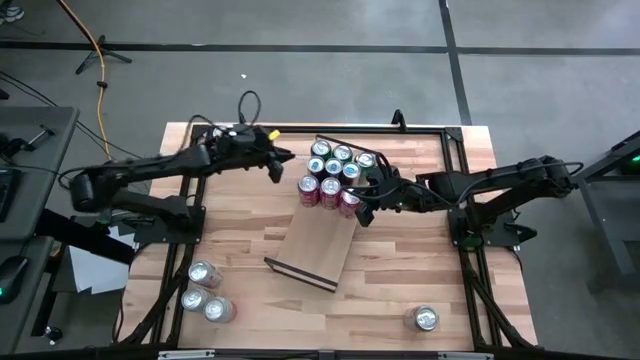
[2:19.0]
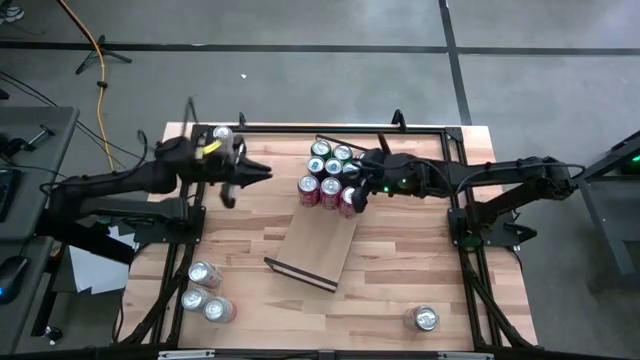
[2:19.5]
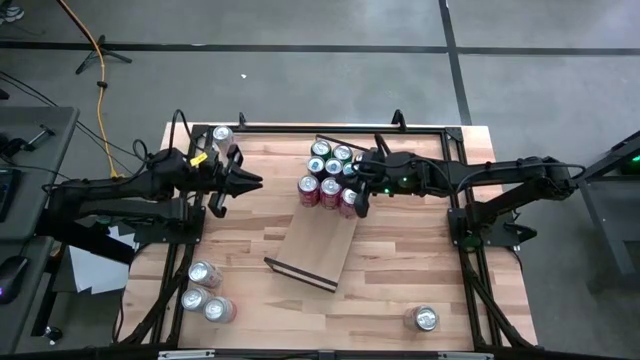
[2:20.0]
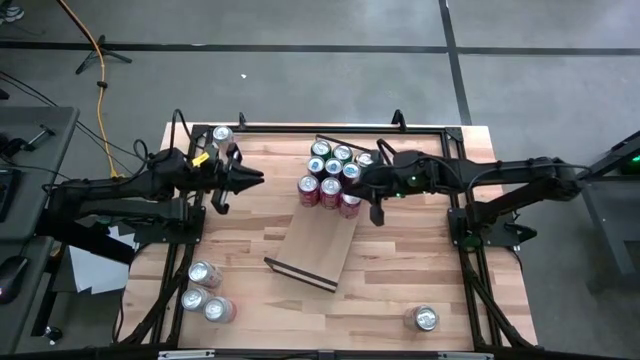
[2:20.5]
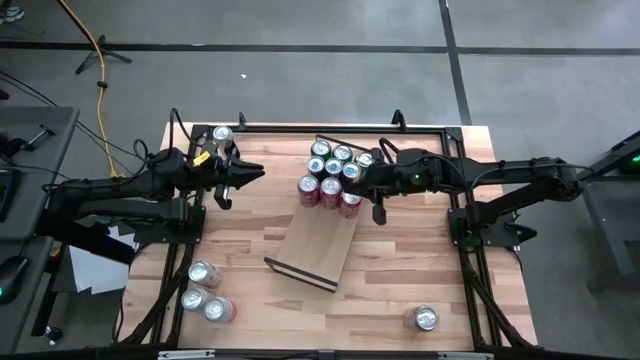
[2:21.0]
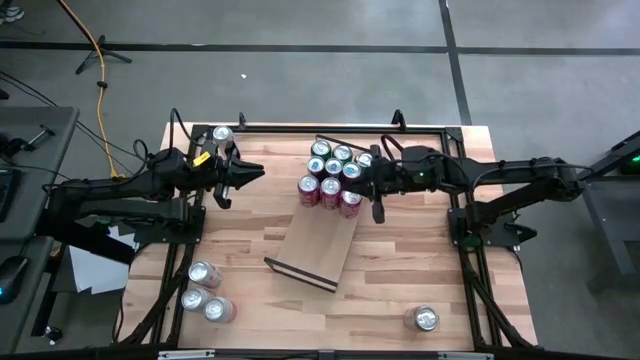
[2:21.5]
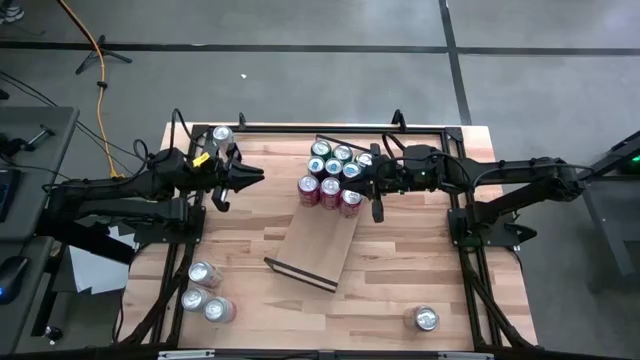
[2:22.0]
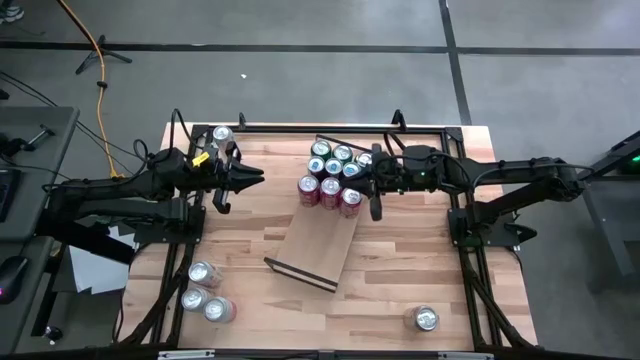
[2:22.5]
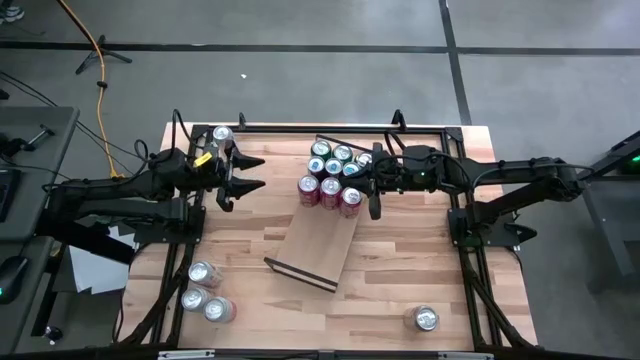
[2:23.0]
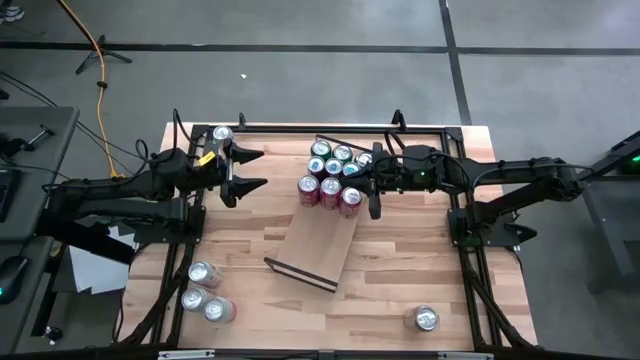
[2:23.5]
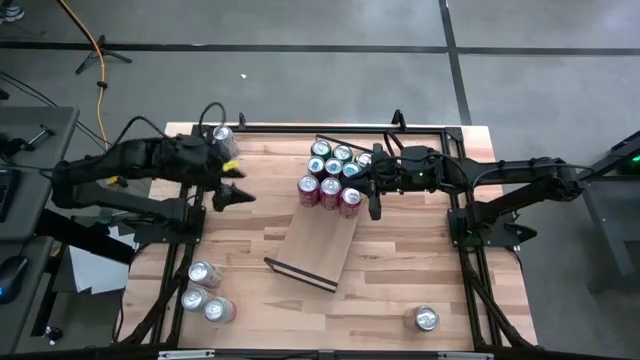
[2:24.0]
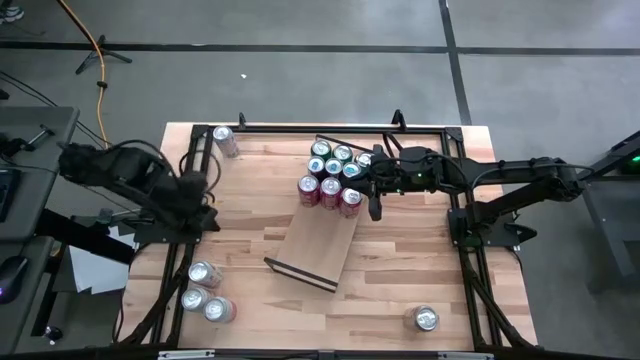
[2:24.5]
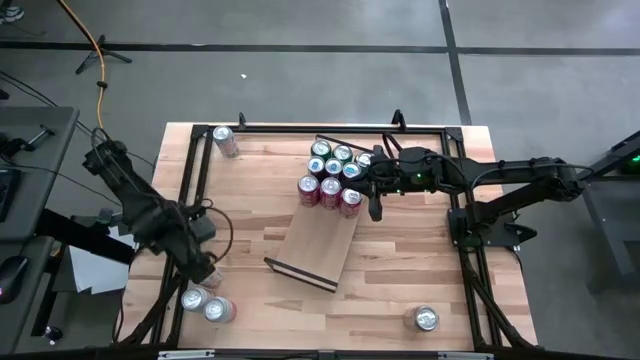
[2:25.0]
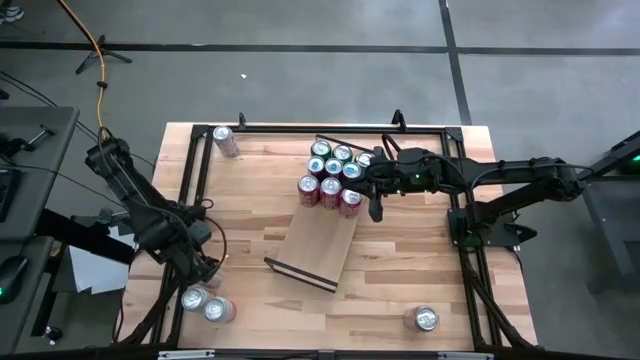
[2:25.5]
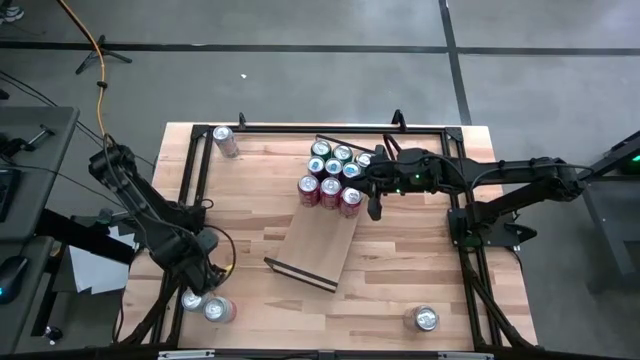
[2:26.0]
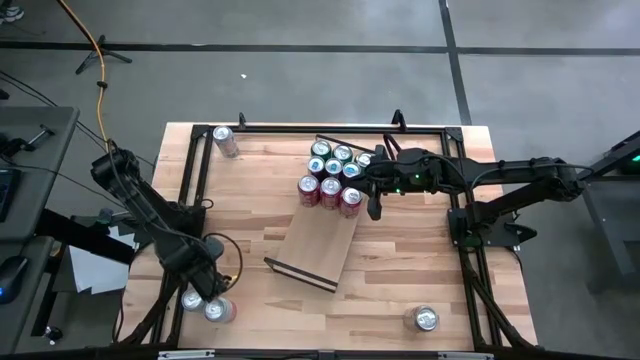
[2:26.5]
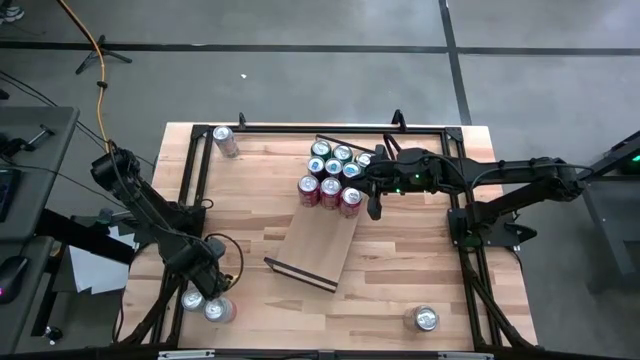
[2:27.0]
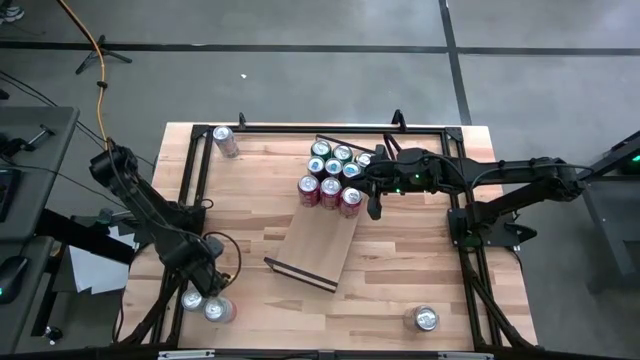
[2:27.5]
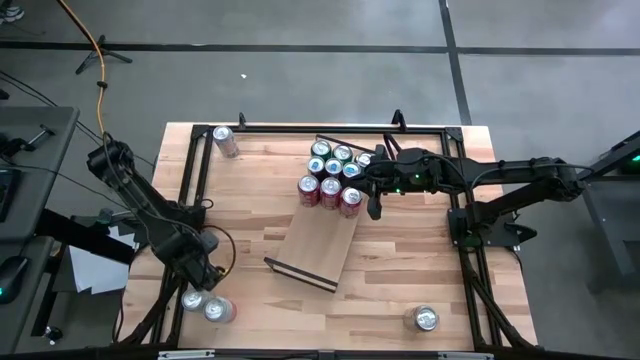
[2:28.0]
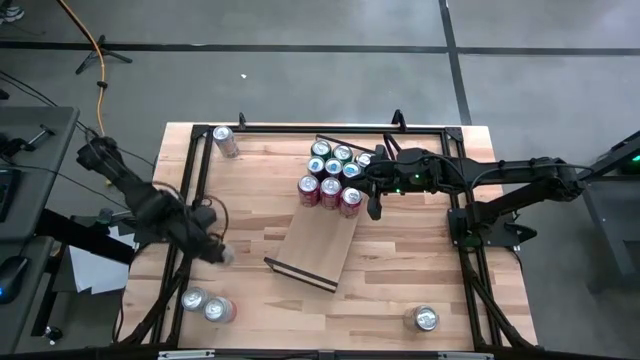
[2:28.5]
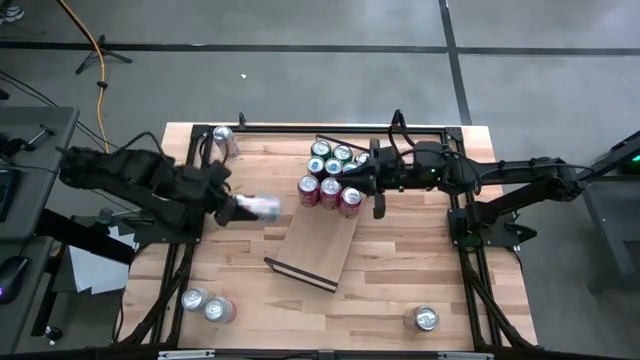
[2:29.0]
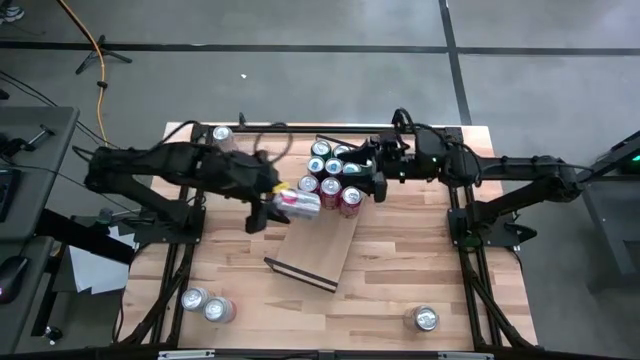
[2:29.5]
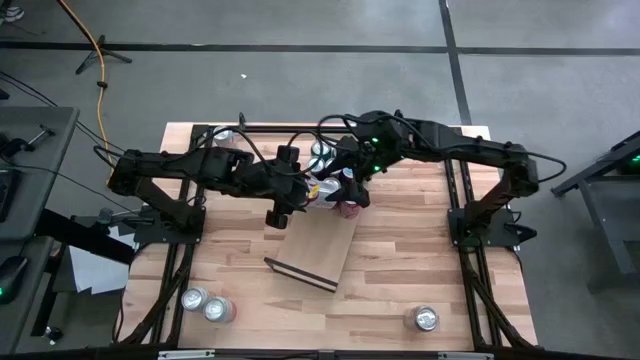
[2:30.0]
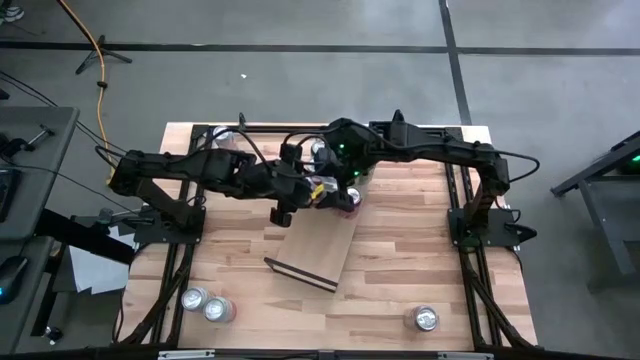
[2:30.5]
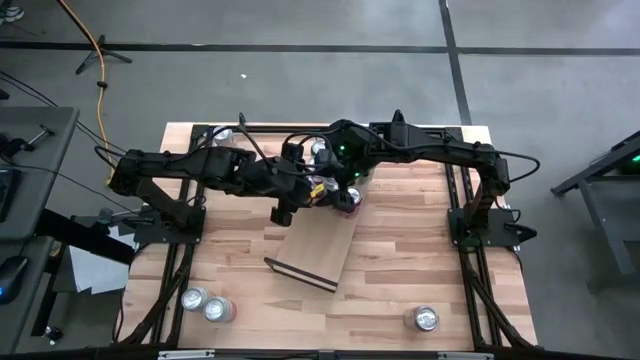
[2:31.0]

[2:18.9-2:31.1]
Task: Place canned beverage on shelf
Put the bottom left red and silver soda can on the shelf

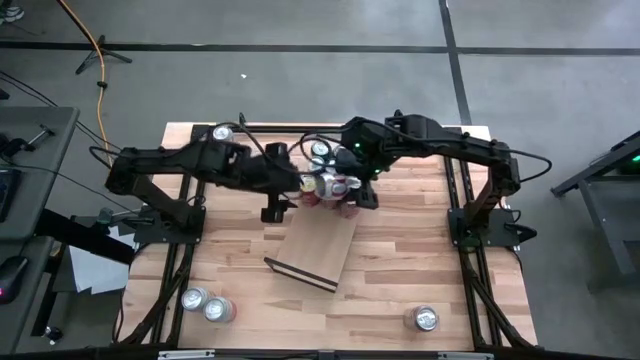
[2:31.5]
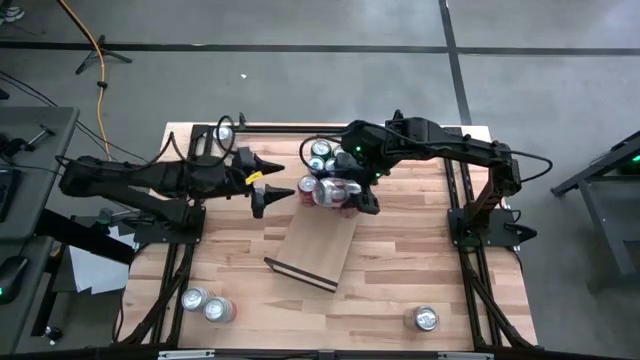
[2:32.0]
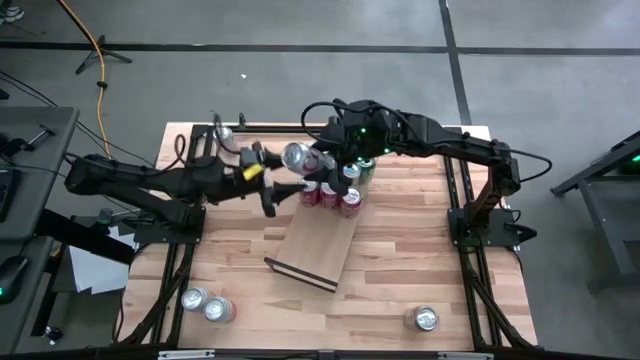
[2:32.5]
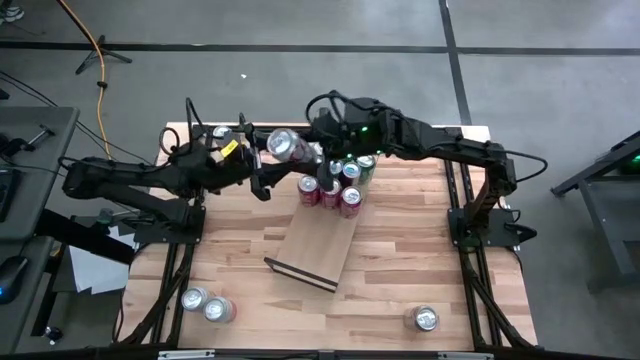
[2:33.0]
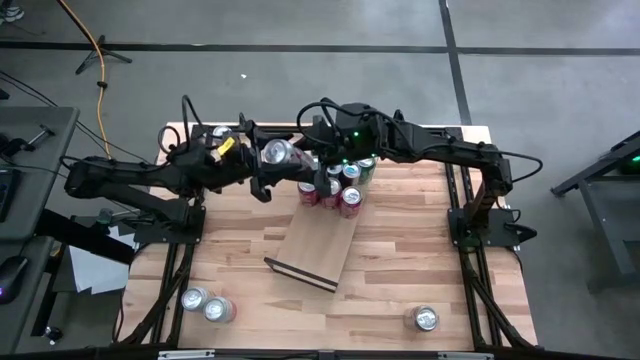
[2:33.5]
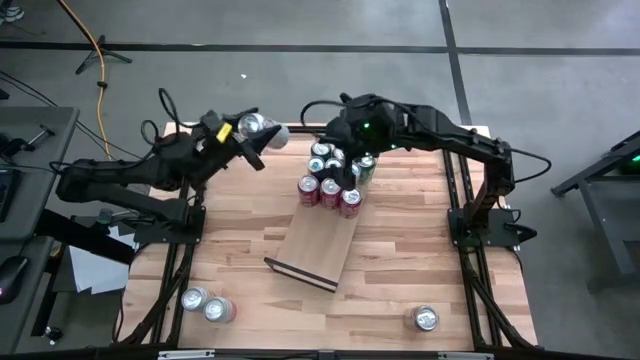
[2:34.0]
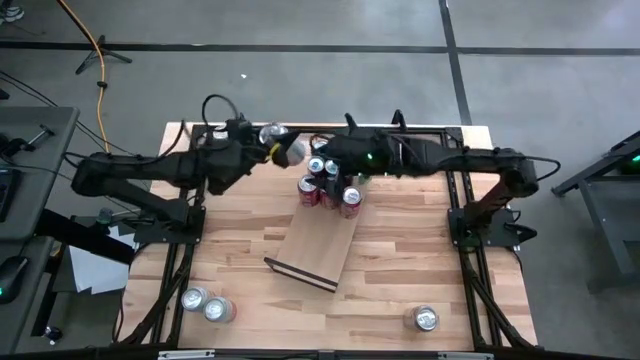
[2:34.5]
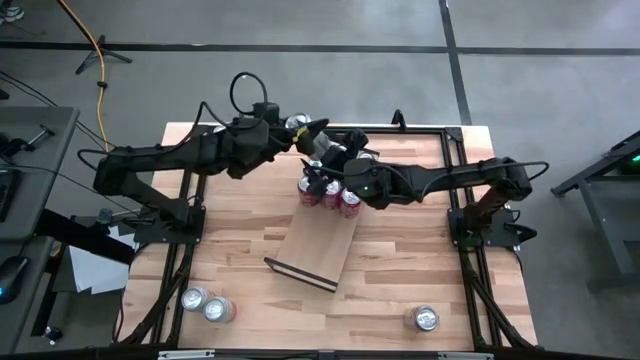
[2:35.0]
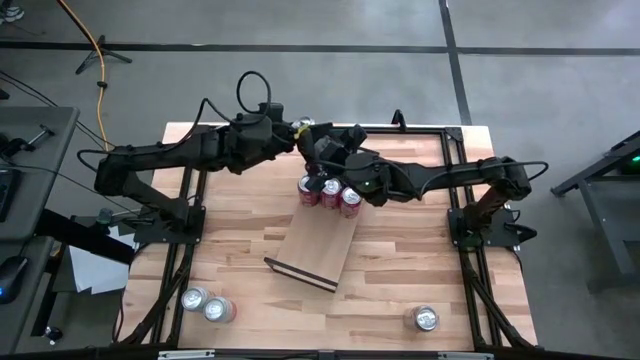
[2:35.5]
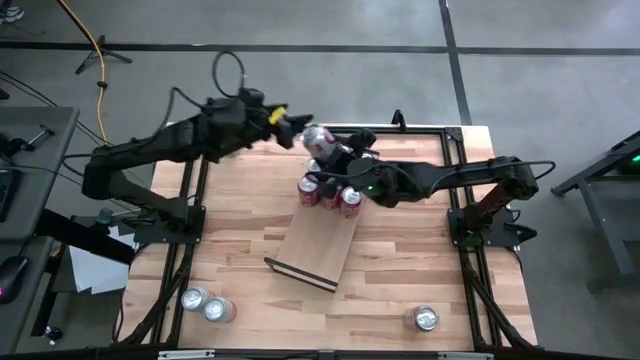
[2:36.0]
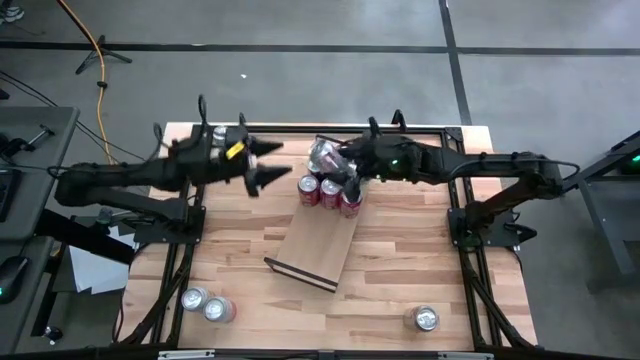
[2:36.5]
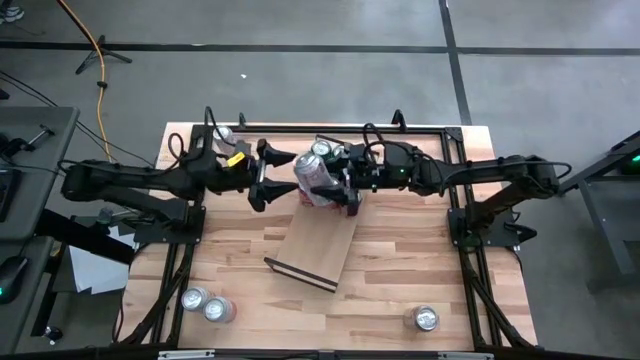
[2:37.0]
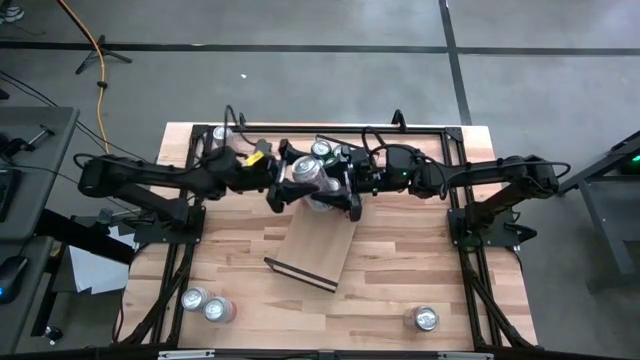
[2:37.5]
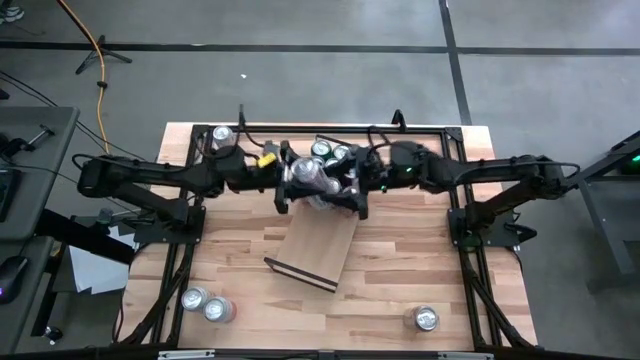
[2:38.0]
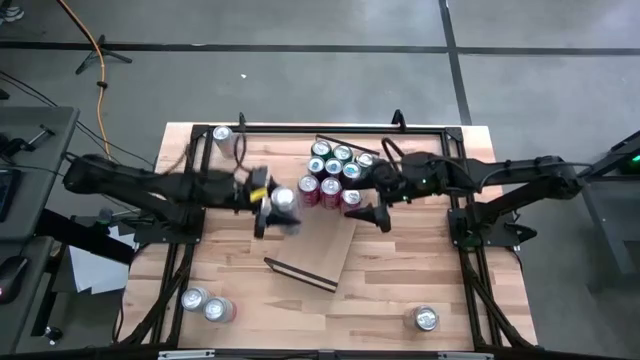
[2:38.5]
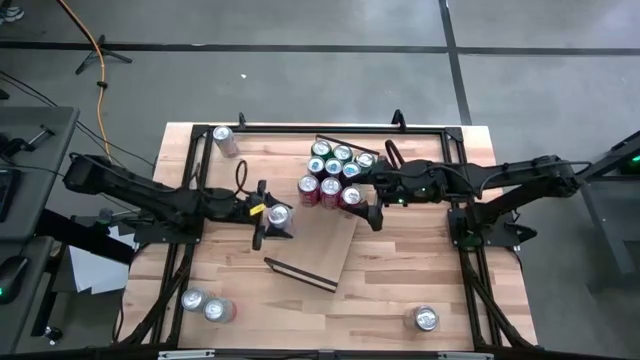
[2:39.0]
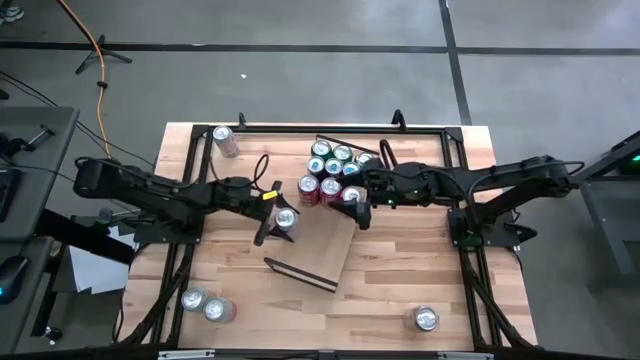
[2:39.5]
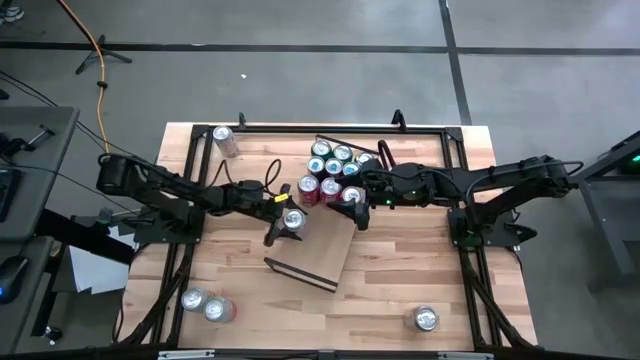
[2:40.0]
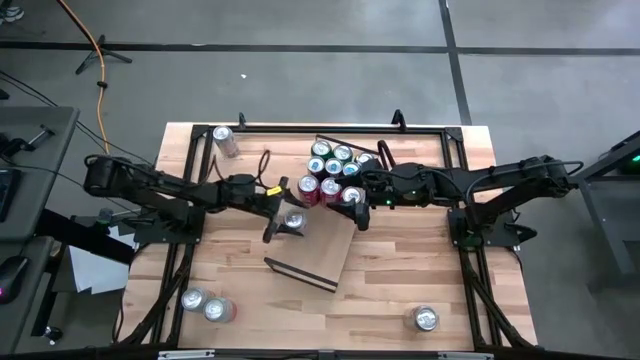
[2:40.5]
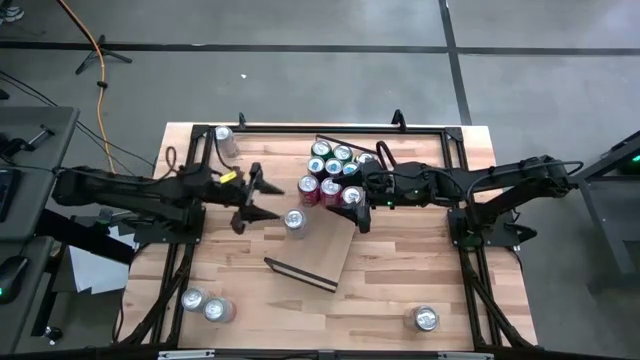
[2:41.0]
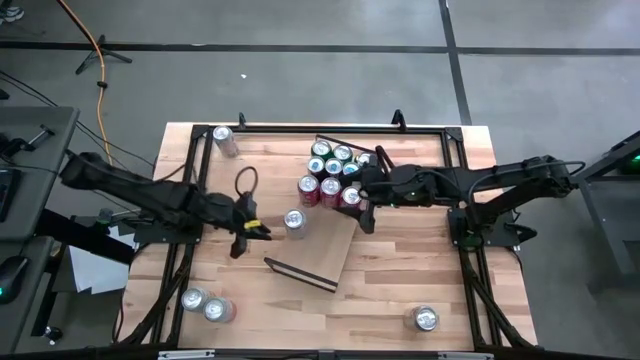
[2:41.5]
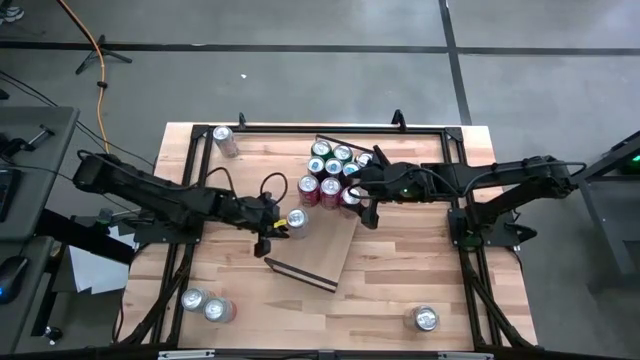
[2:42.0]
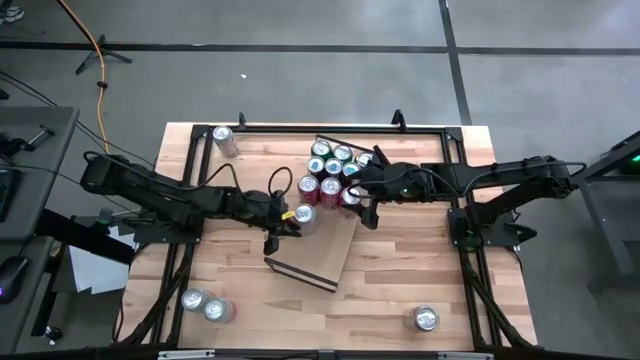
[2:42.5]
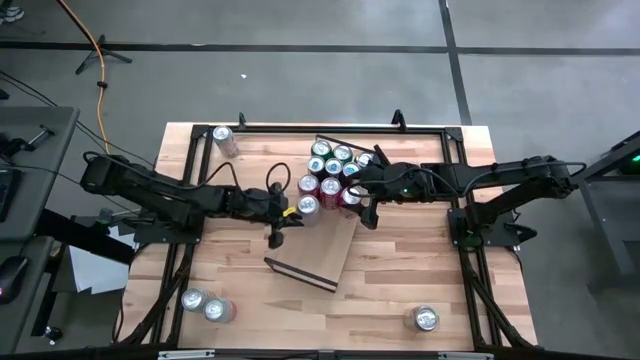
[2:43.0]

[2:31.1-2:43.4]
Put the bottom left red and silver soda can on the shelf
